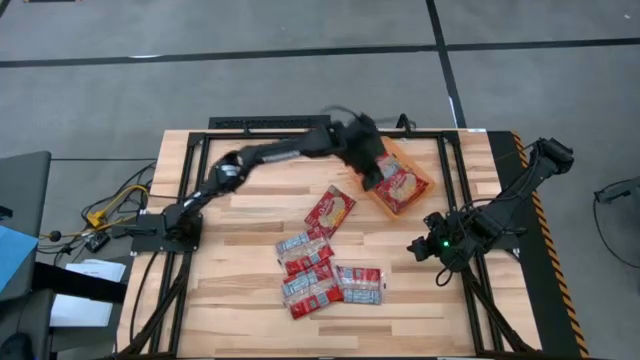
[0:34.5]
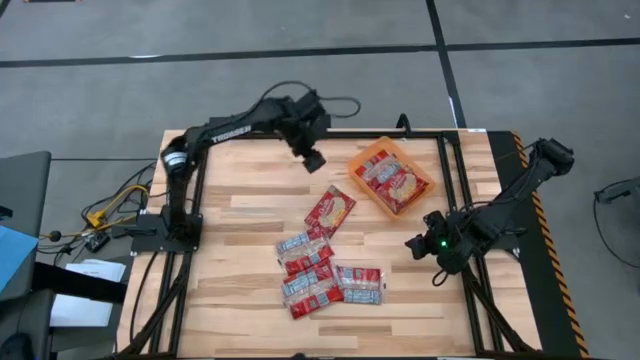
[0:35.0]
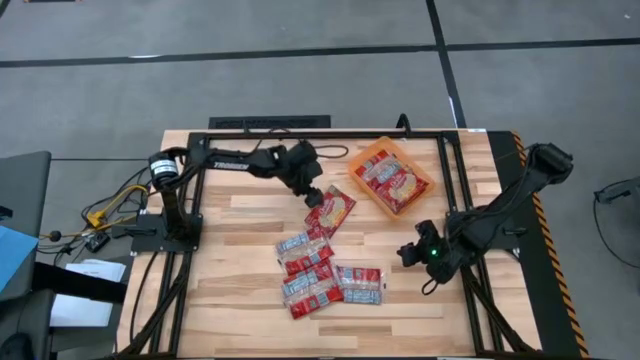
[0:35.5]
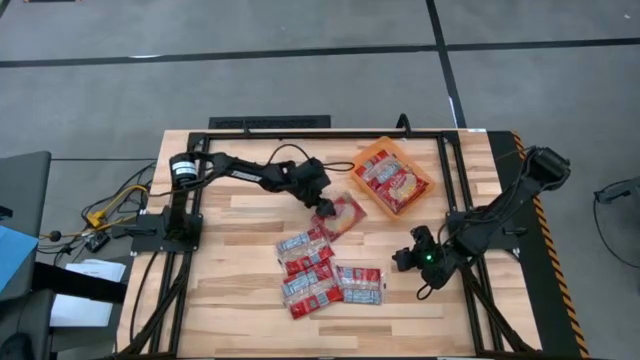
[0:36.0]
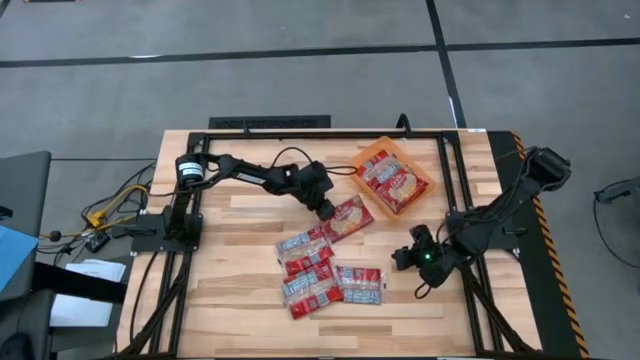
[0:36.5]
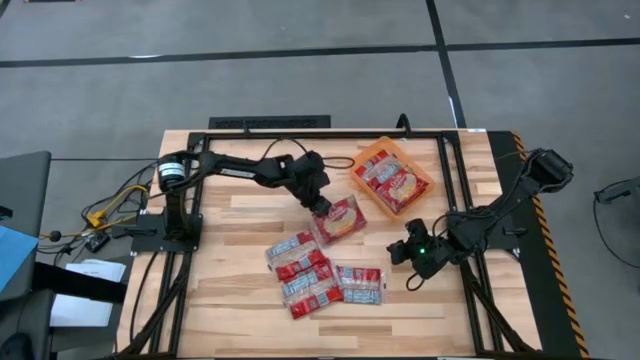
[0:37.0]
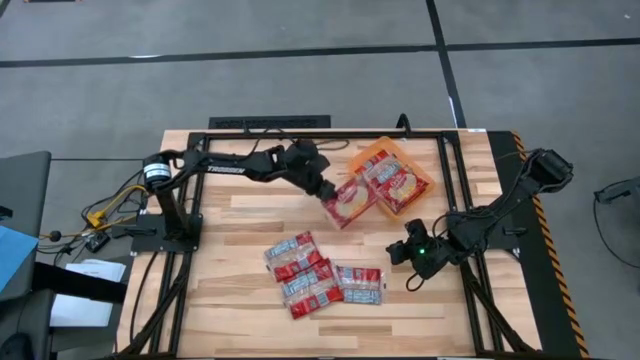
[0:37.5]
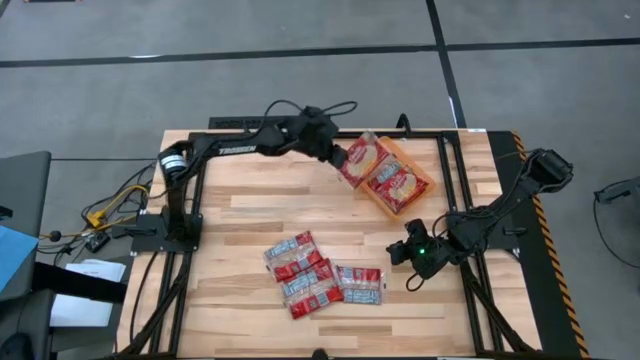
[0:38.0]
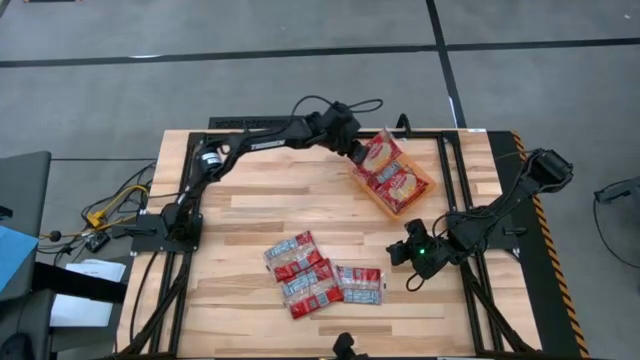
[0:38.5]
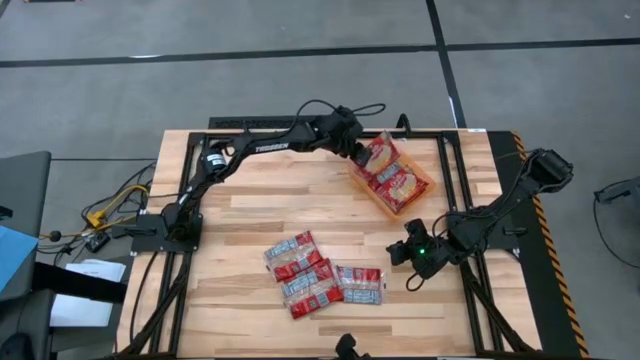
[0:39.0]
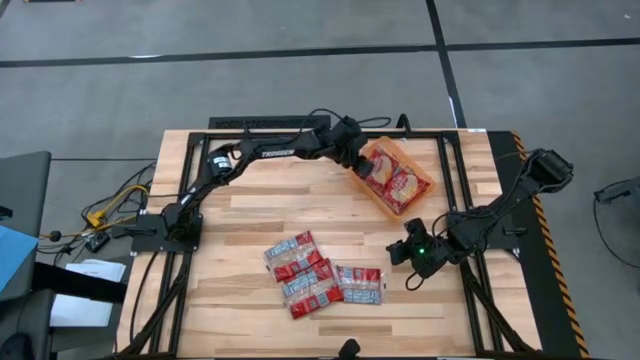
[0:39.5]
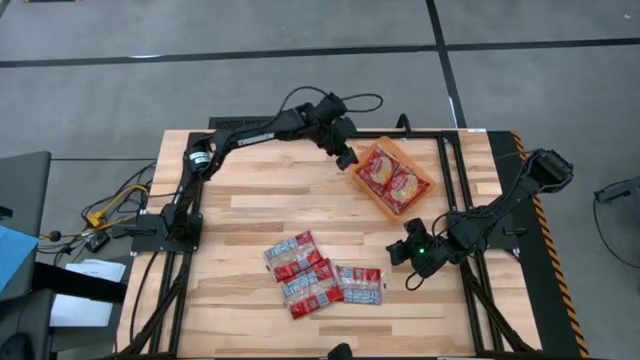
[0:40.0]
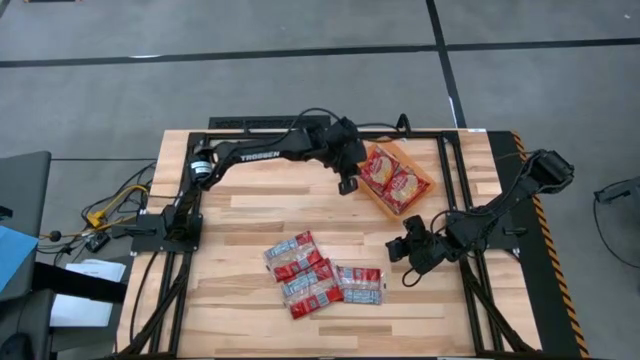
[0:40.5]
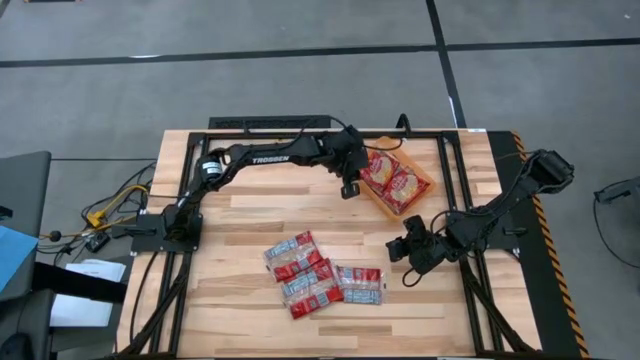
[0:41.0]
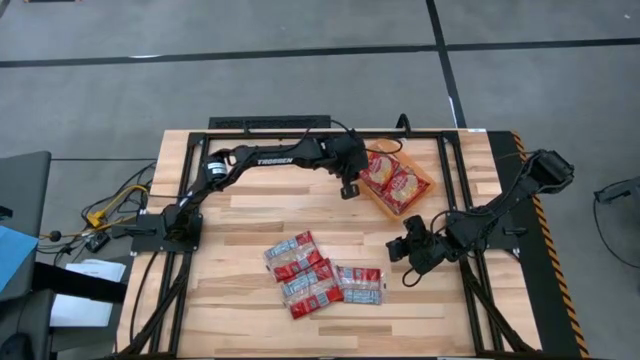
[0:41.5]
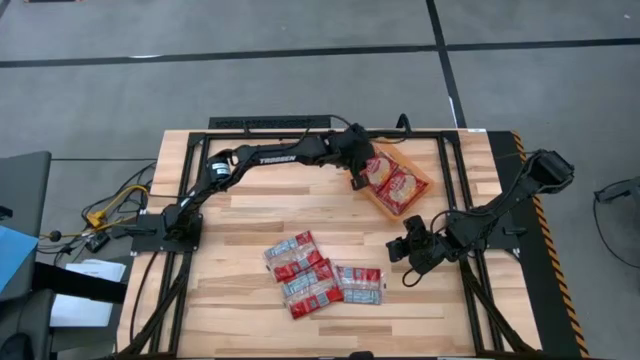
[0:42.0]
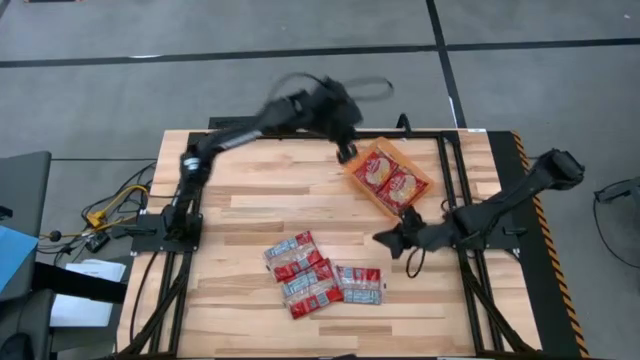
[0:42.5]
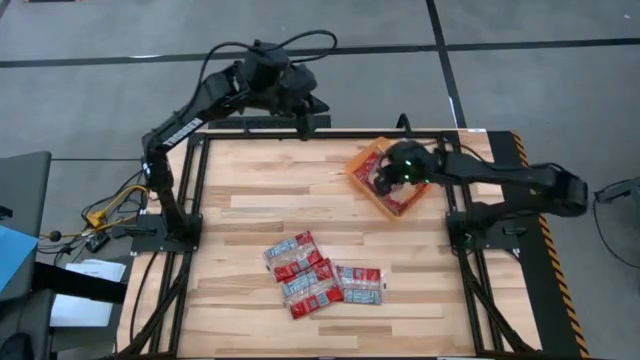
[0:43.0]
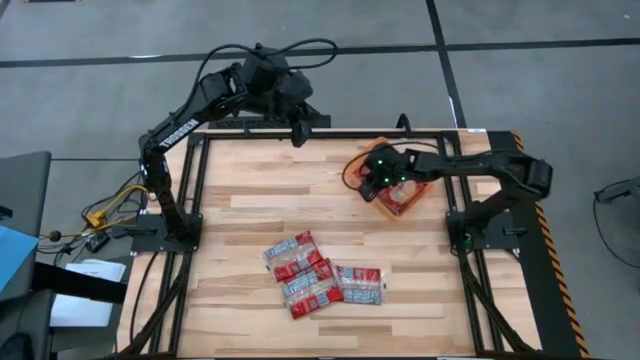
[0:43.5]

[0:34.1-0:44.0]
Task: Sort popcorn bags into baskets
Put the popcorn bag into the orange transparent bin

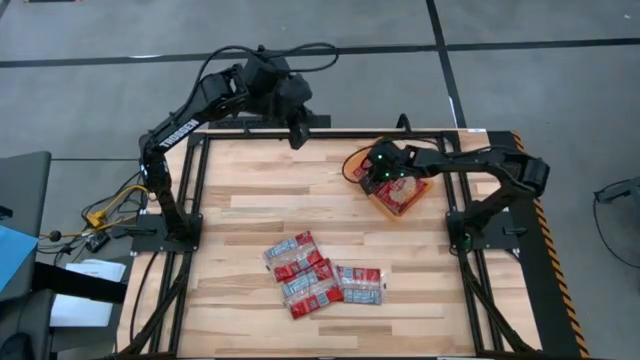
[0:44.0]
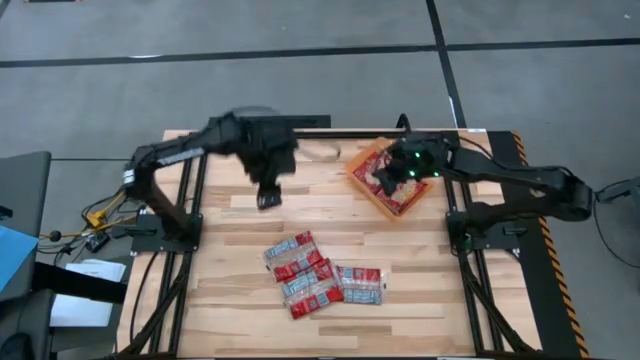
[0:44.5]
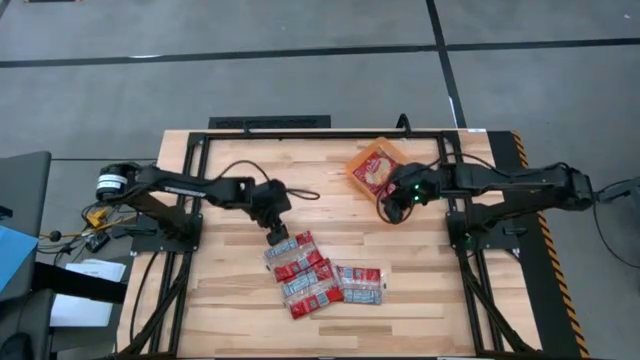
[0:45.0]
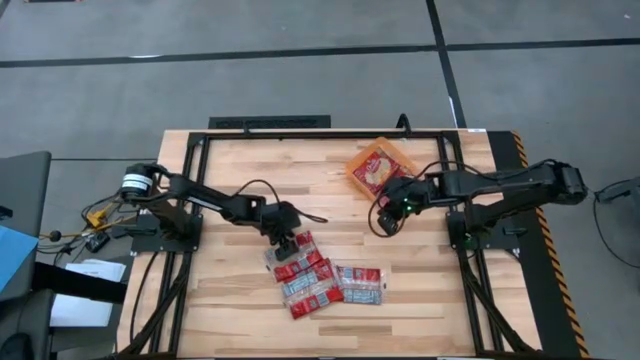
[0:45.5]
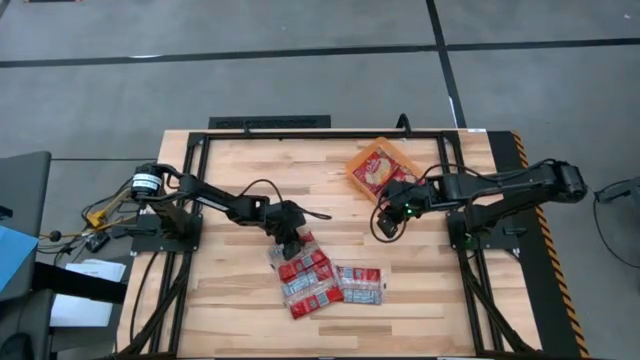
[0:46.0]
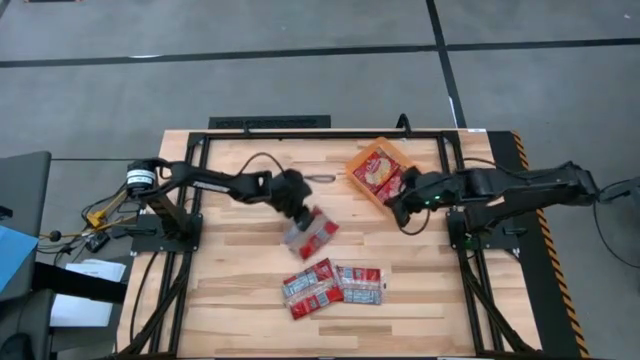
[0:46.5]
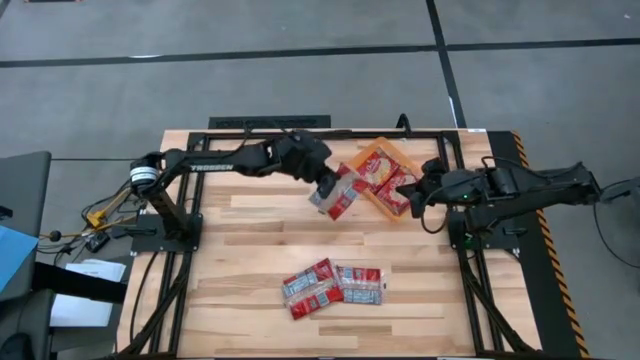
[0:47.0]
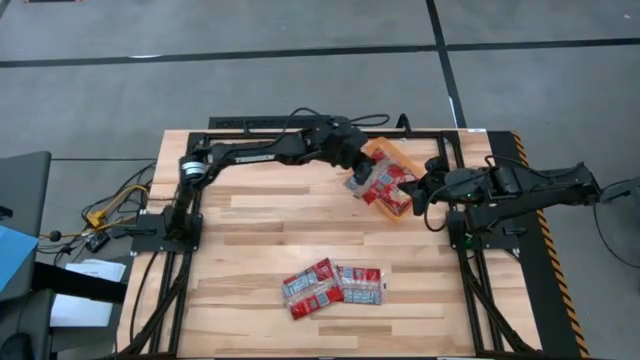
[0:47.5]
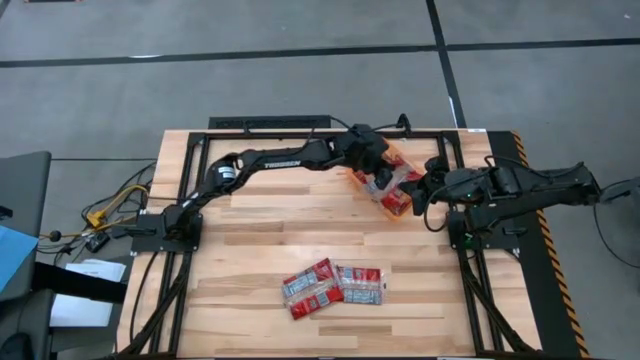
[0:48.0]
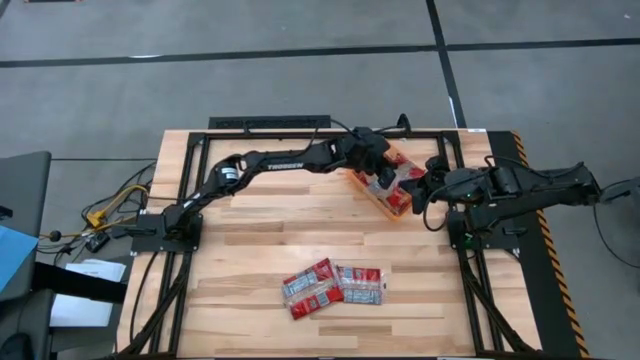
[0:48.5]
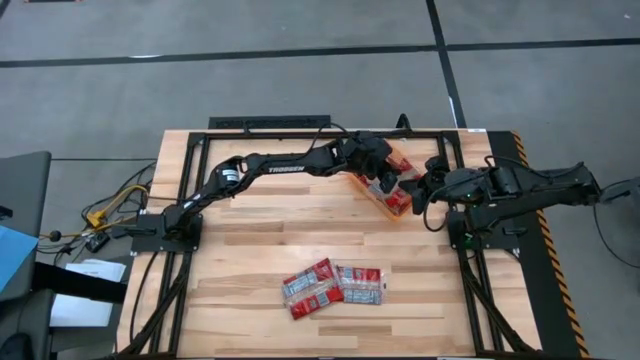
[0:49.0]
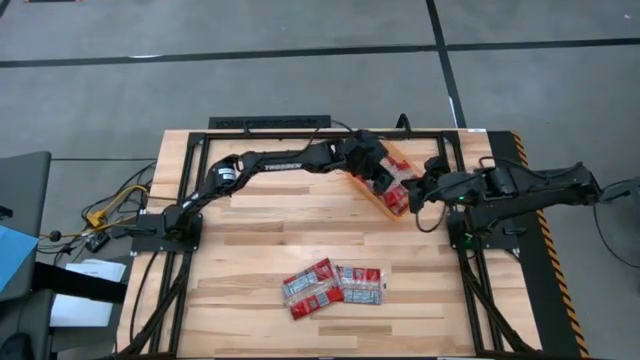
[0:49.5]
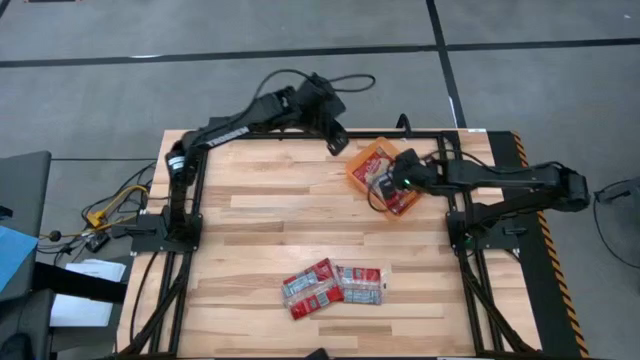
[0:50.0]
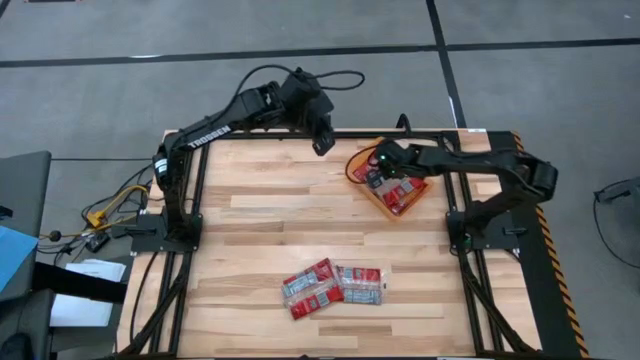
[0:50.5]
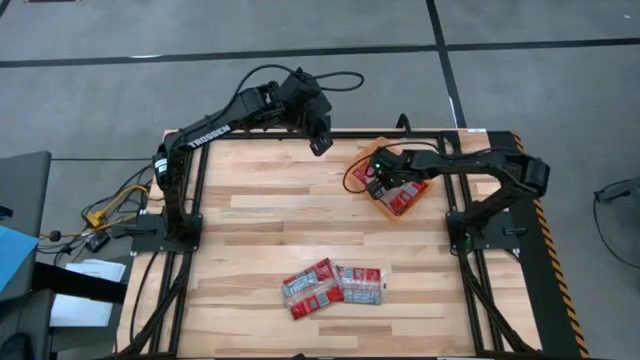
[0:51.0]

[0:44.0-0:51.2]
Put the popcorn bag into the orange transparent bin

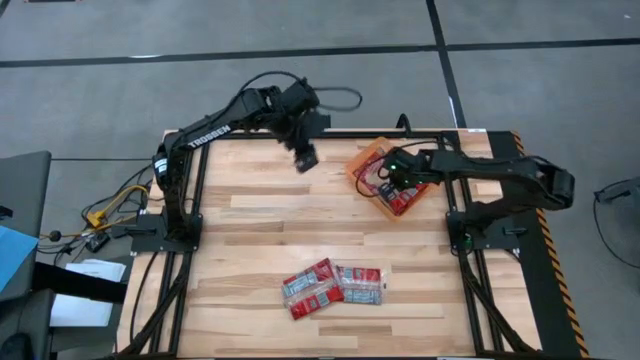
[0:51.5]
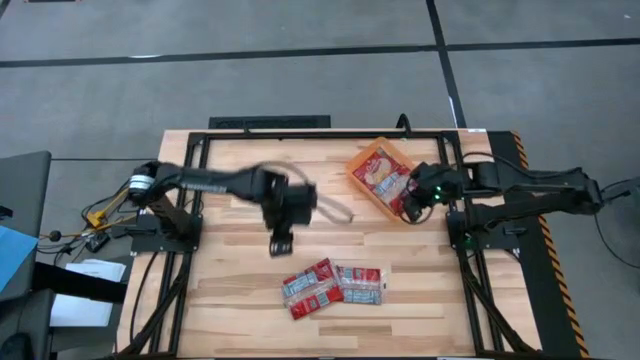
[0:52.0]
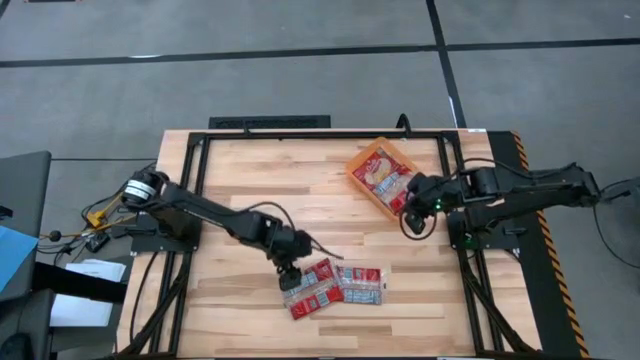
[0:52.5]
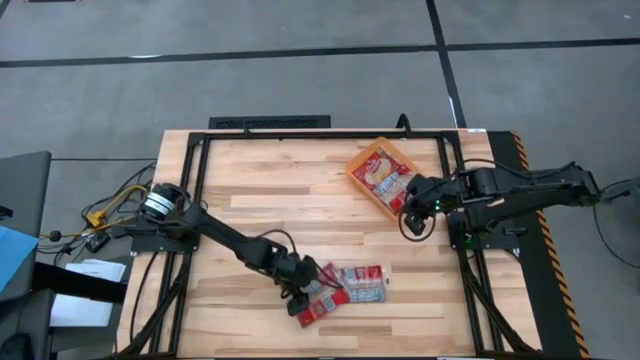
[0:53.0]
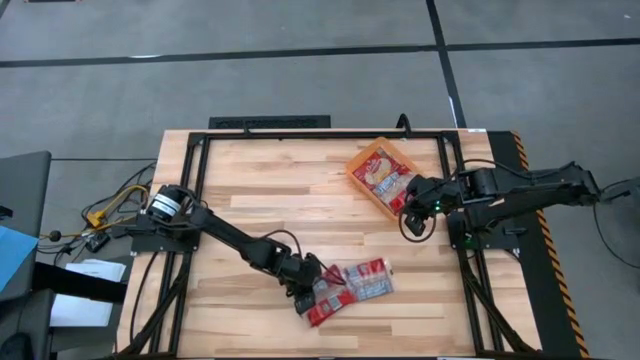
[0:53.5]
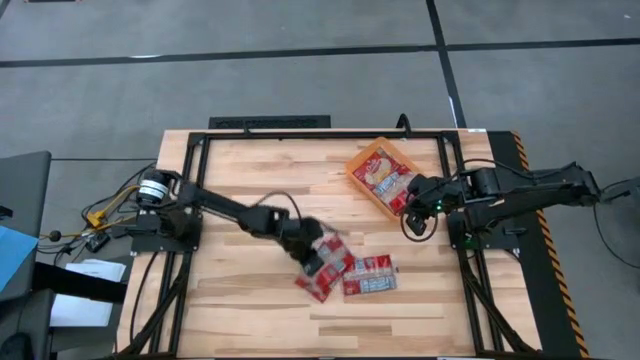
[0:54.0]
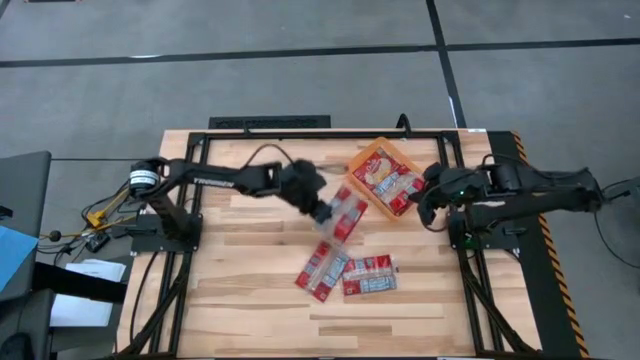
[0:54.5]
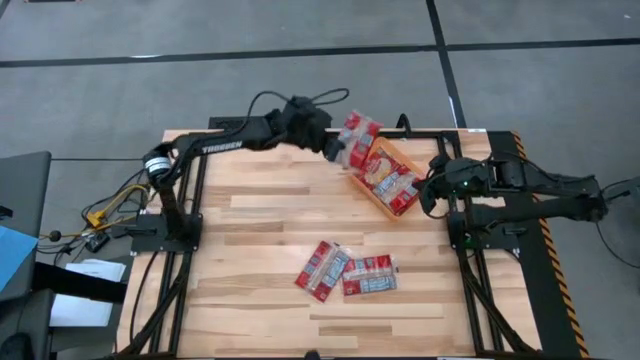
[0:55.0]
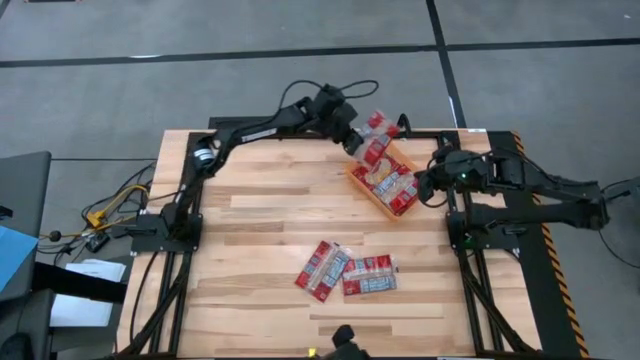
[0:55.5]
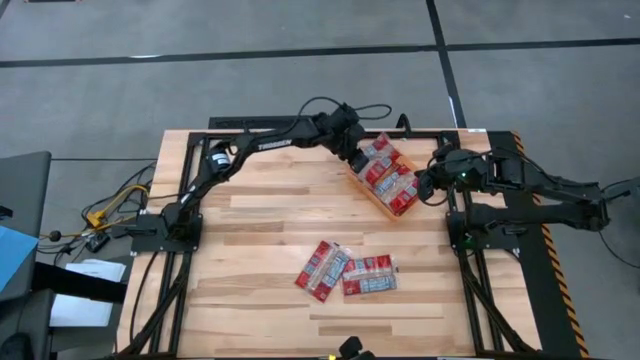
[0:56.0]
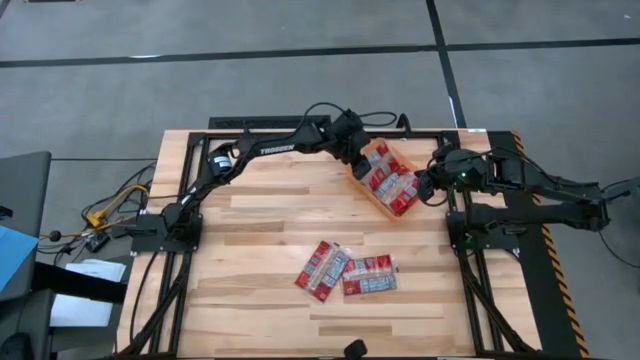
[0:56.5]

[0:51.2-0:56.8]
Put the popcorn bag into the orange transparent bin
